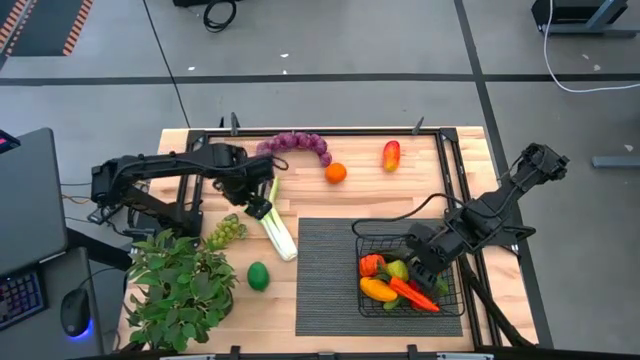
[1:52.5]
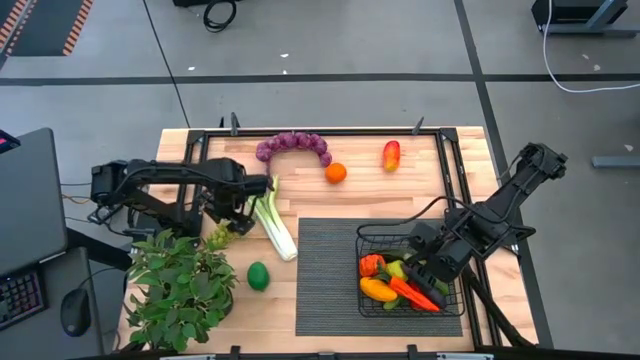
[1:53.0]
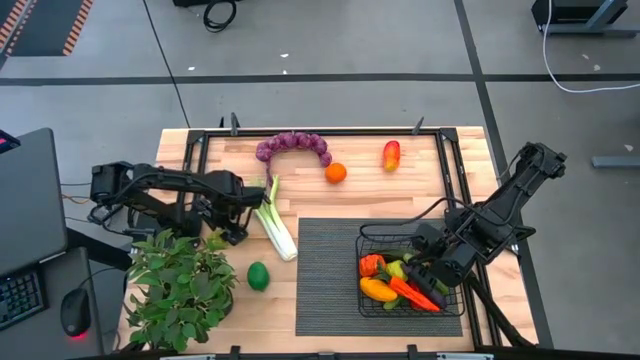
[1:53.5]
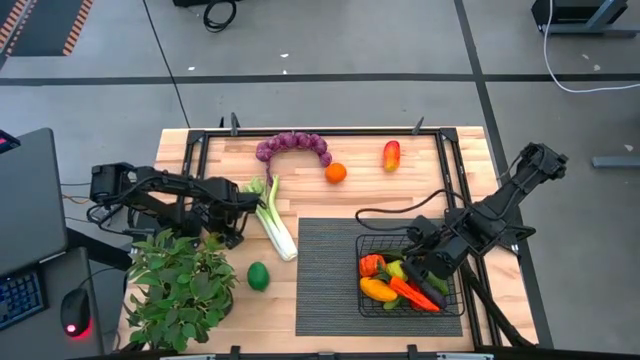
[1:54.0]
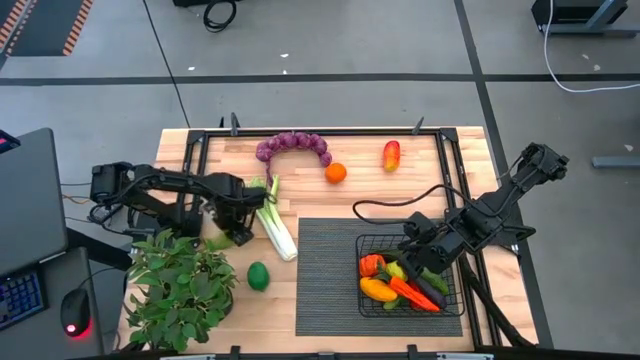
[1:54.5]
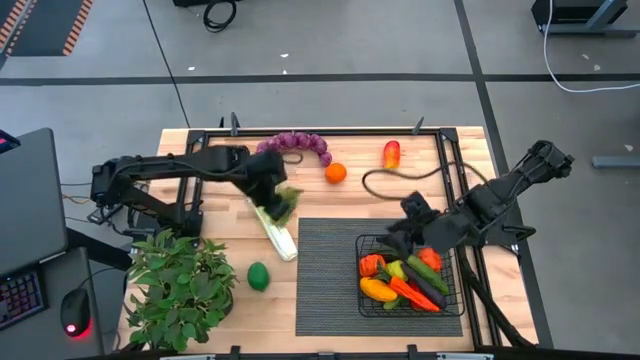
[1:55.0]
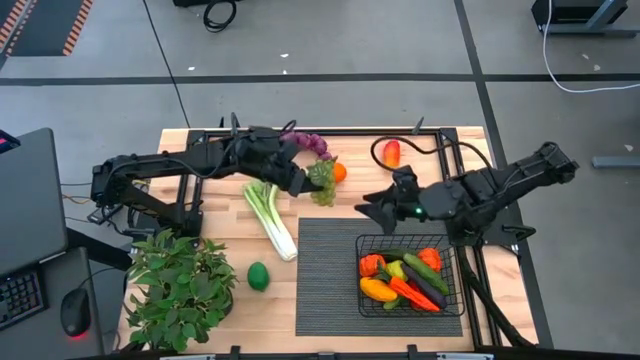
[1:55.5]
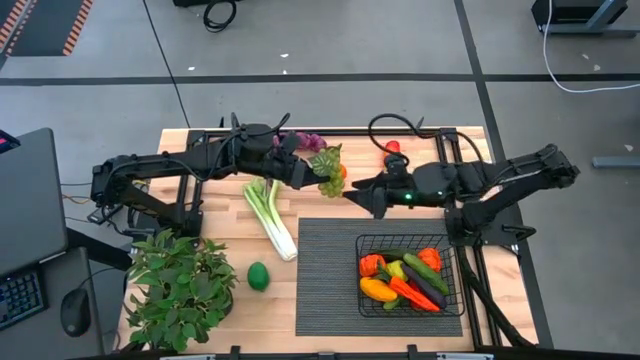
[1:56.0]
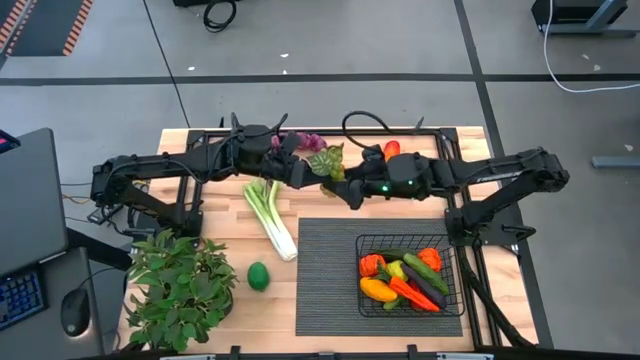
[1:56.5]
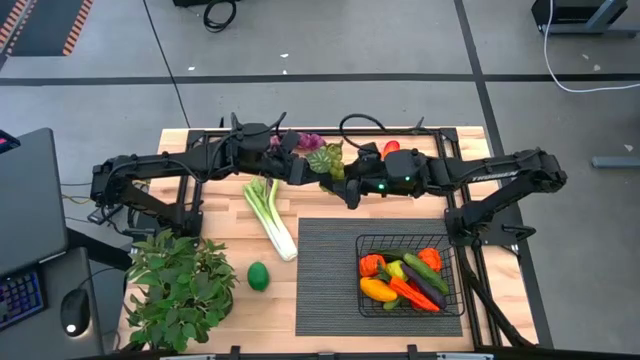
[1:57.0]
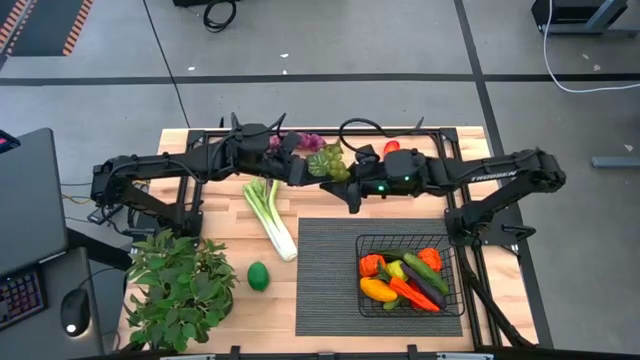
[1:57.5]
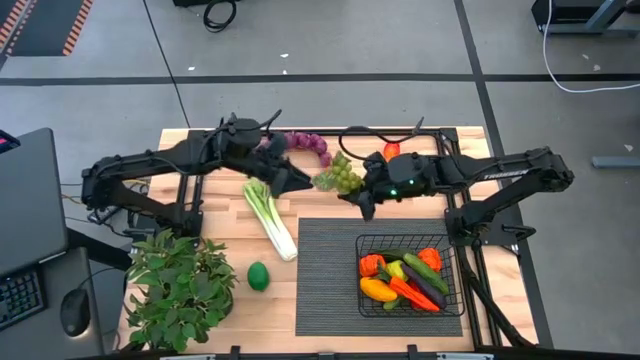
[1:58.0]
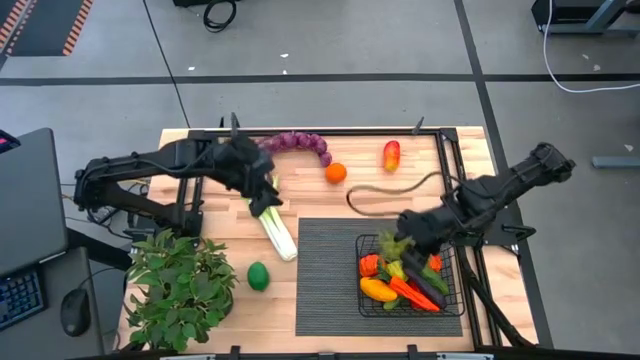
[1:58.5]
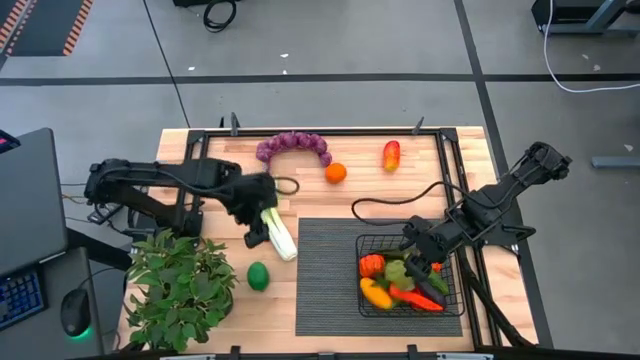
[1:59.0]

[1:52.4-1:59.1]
Task: Build produce basket
Put the grapes into the wire basket

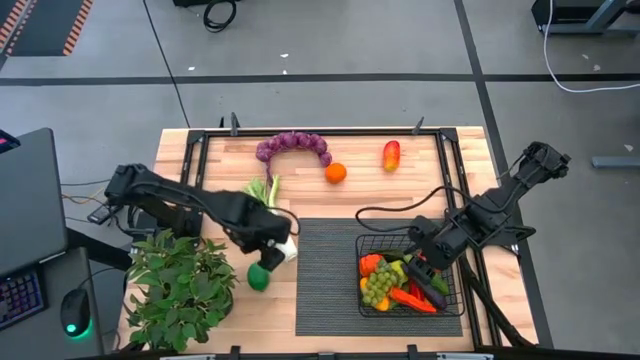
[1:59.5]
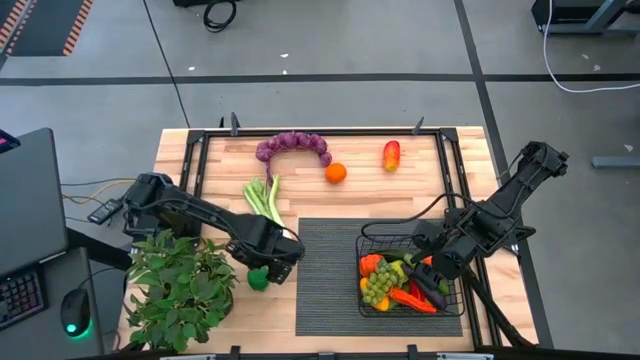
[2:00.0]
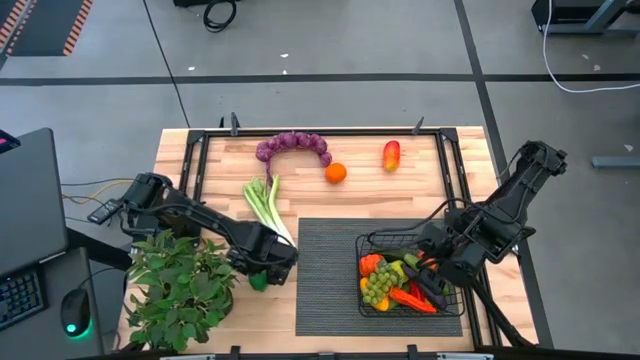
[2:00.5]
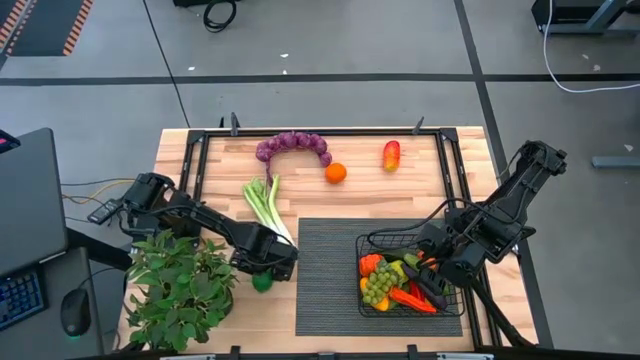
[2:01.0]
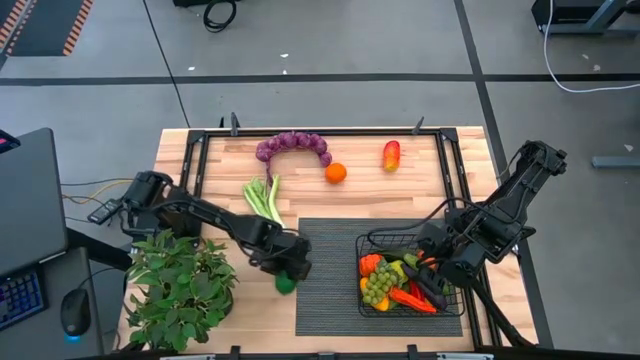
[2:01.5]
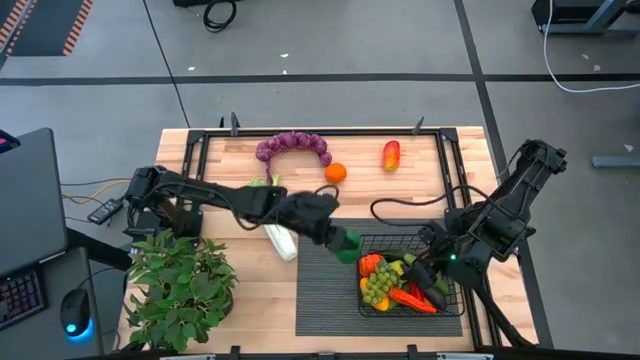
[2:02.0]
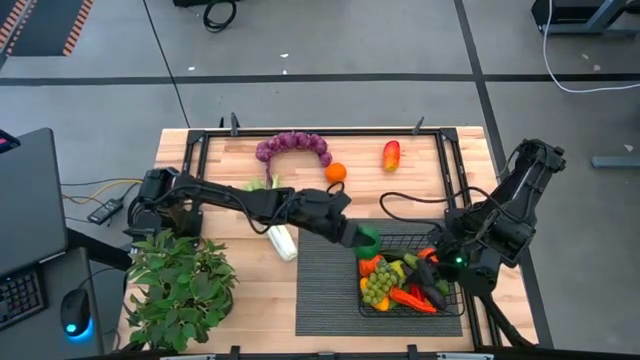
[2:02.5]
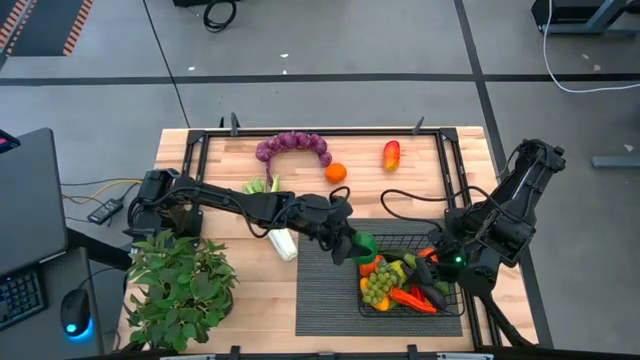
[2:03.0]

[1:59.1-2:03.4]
Put the lime into the wire basket

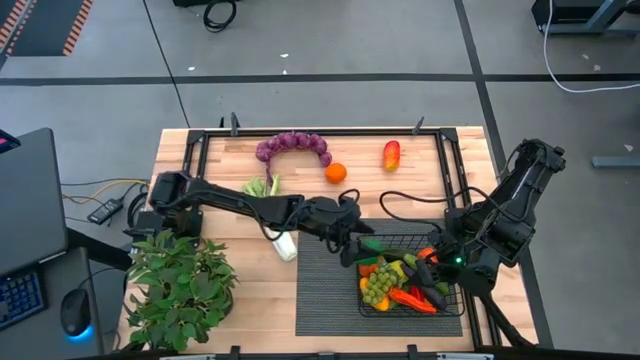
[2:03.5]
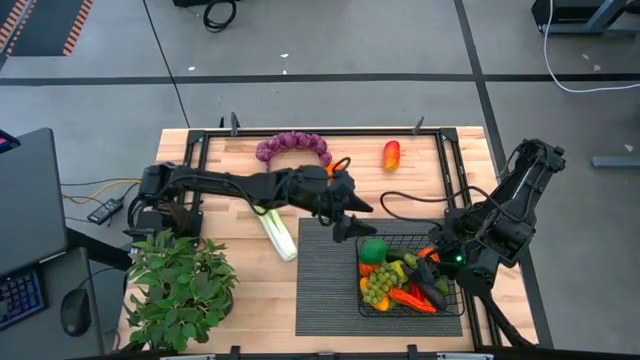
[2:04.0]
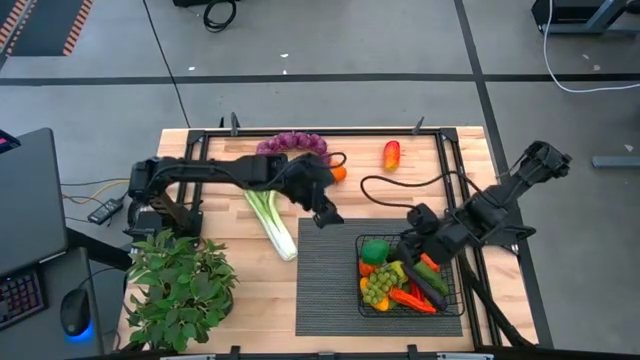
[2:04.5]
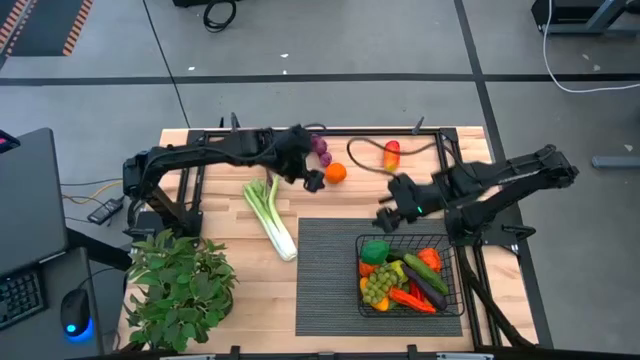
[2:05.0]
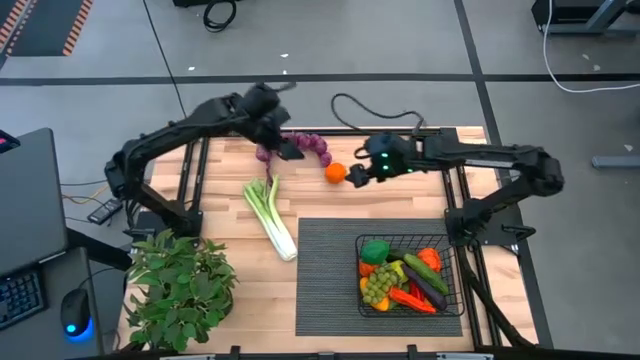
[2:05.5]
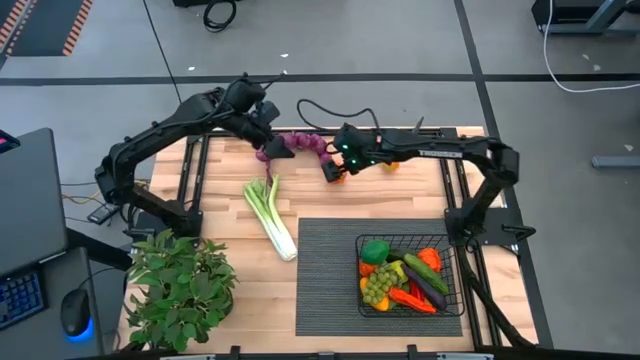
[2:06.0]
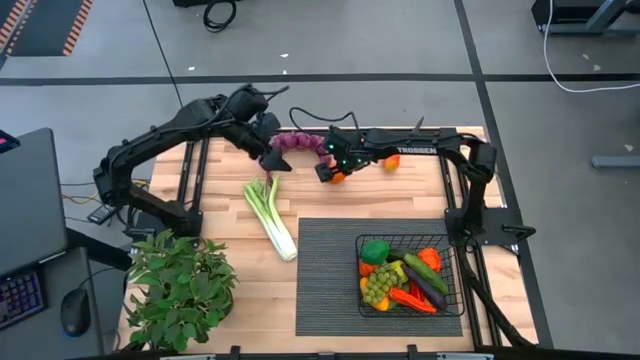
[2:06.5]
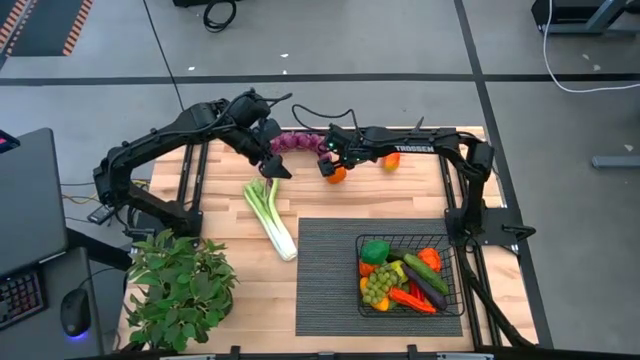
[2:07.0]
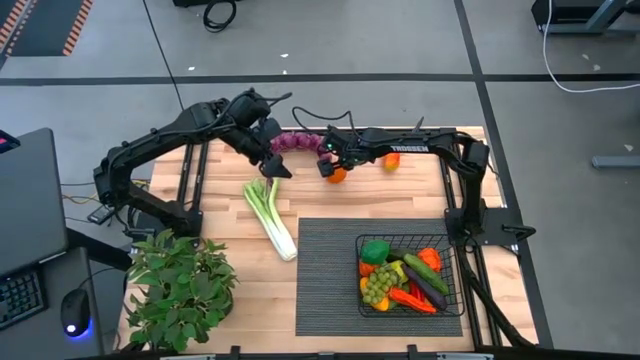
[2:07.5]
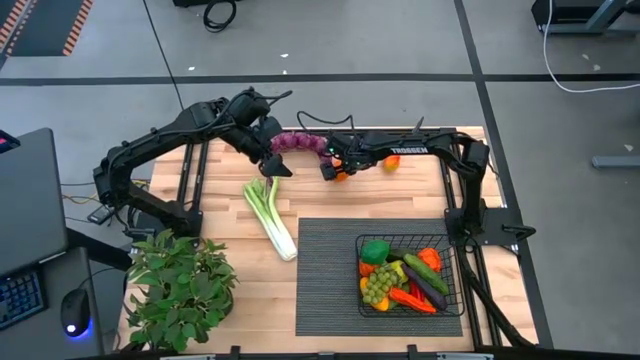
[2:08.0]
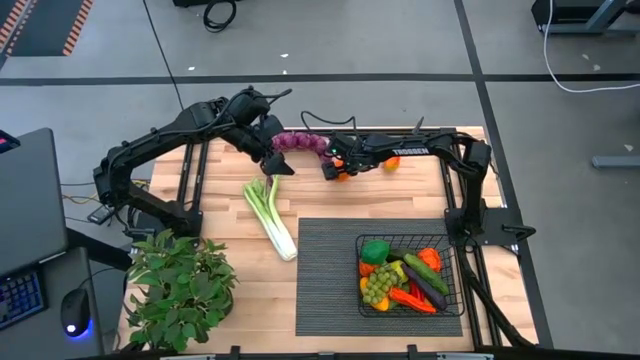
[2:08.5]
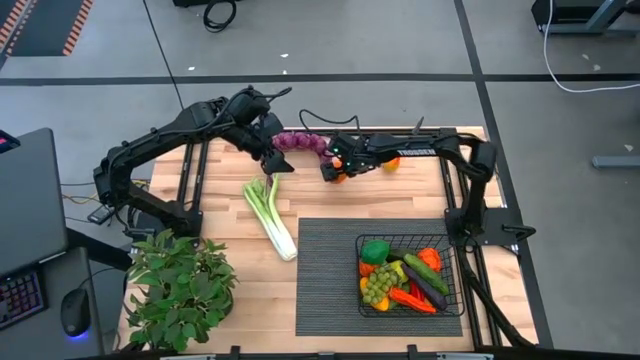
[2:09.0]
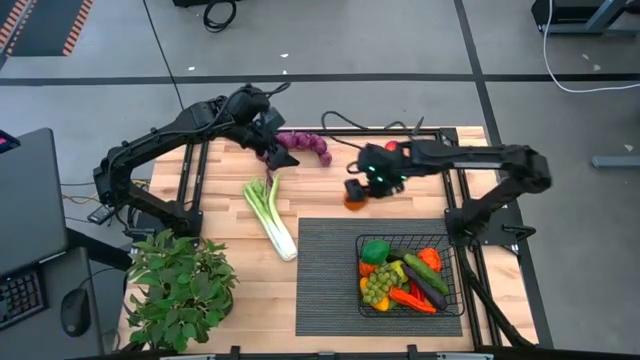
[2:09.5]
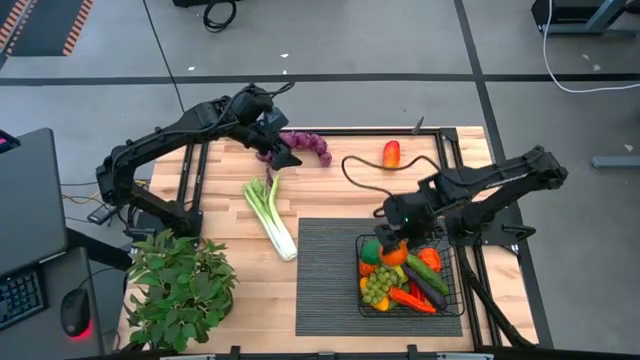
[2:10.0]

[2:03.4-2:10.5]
Put the orange into the wire basket

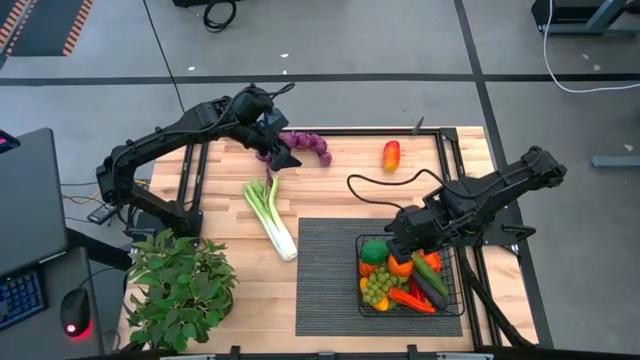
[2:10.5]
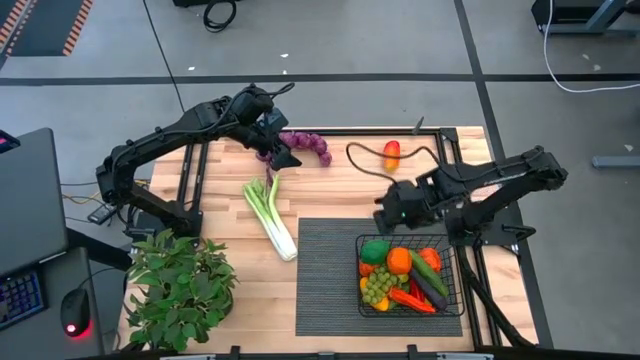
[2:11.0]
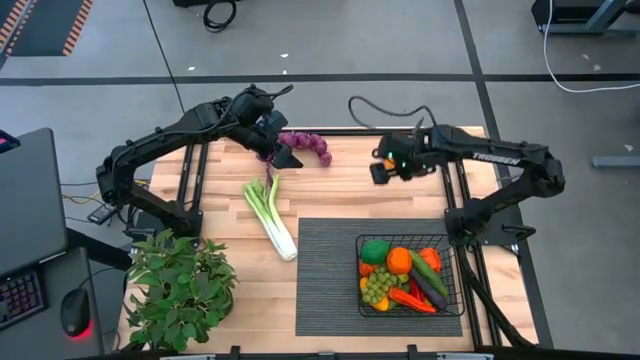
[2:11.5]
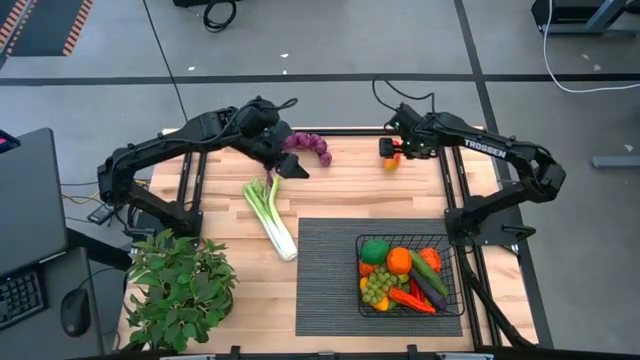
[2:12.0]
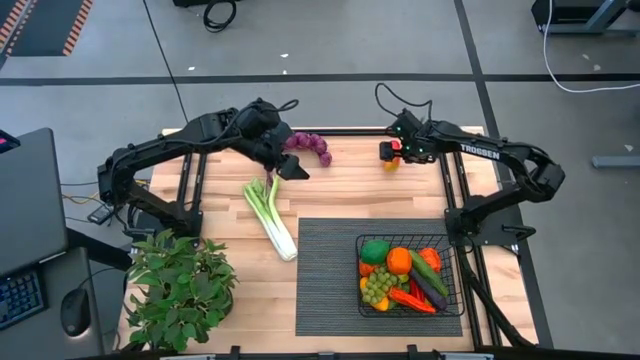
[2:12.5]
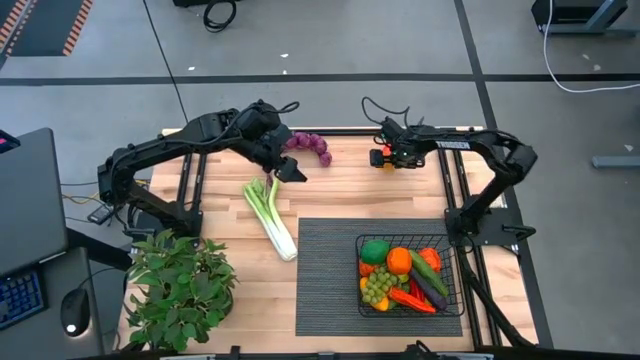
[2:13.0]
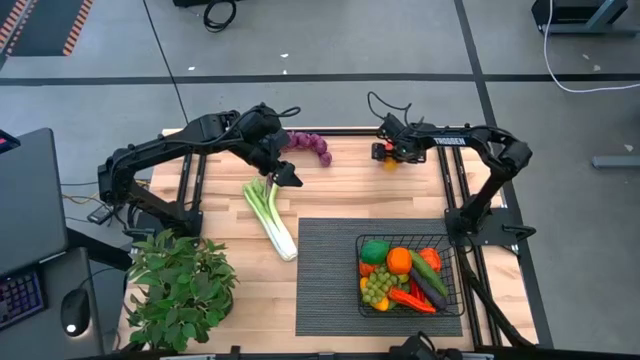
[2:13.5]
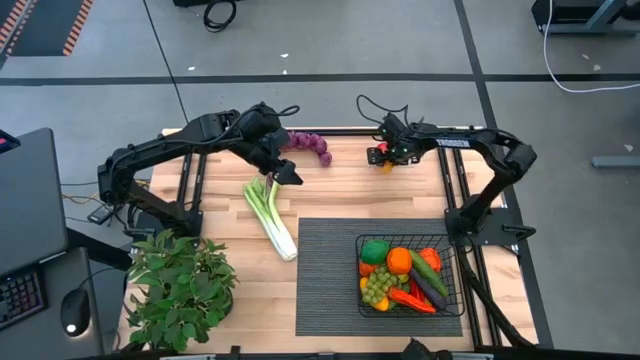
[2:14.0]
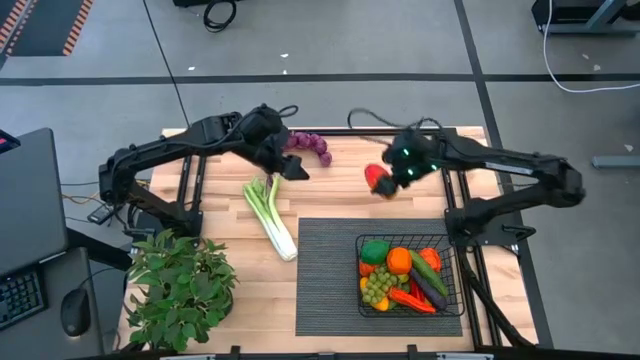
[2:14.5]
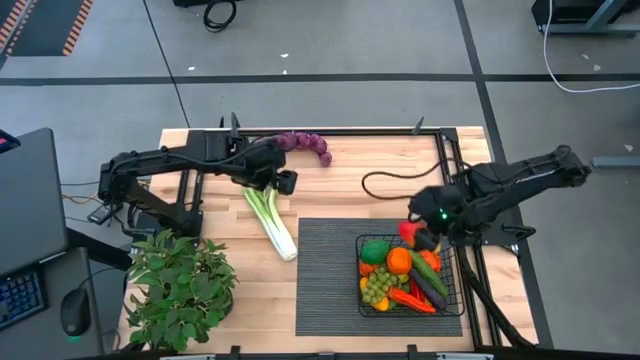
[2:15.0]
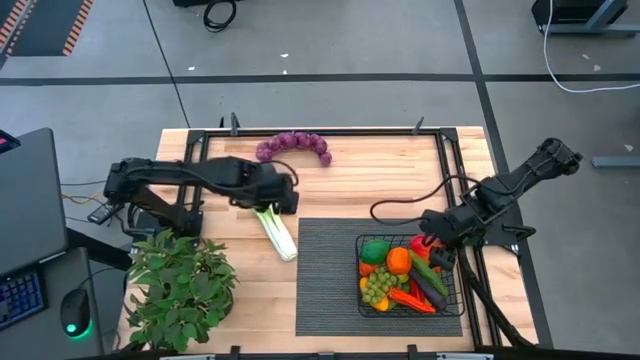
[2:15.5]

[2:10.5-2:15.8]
Put the mango into the wire basket
